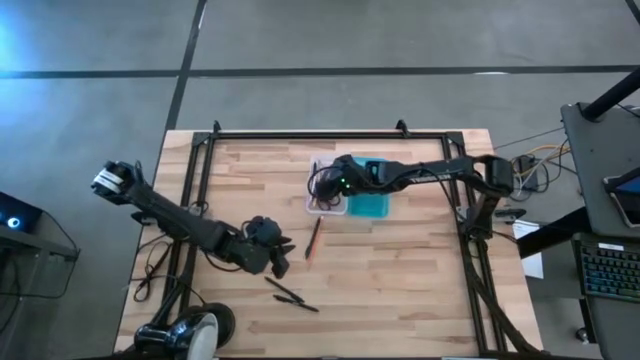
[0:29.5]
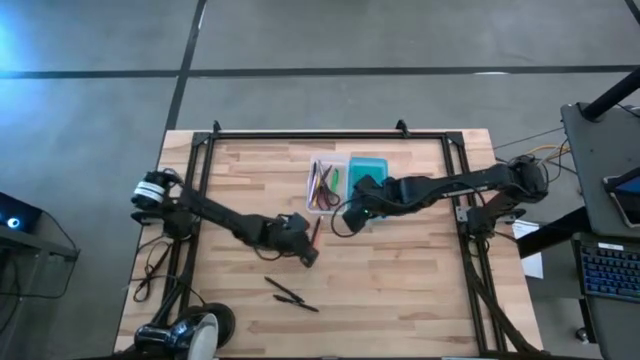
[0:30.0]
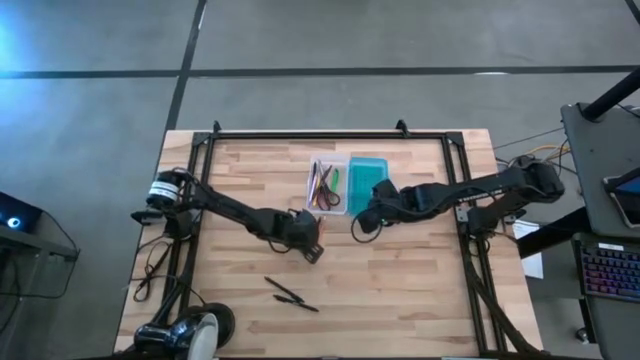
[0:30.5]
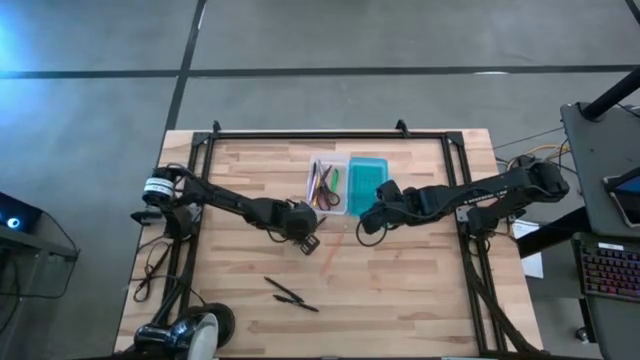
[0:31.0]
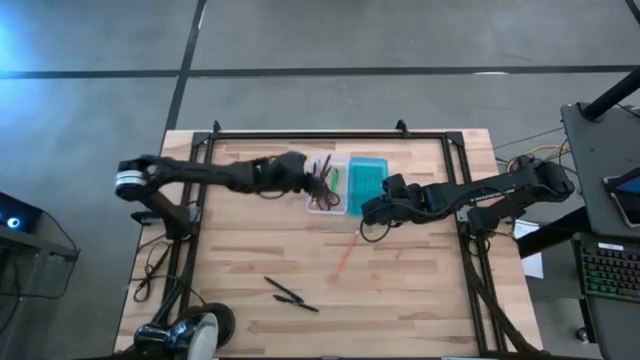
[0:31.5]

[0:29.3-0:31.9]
Task: Pick & place school supplies into a supply box
Put the black pen into the supply box

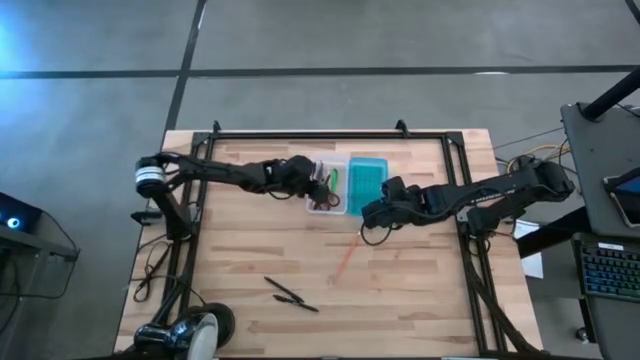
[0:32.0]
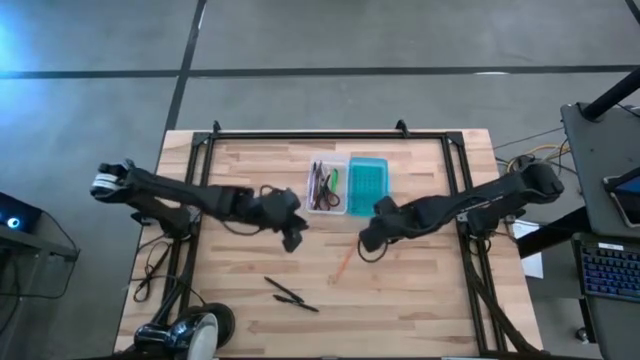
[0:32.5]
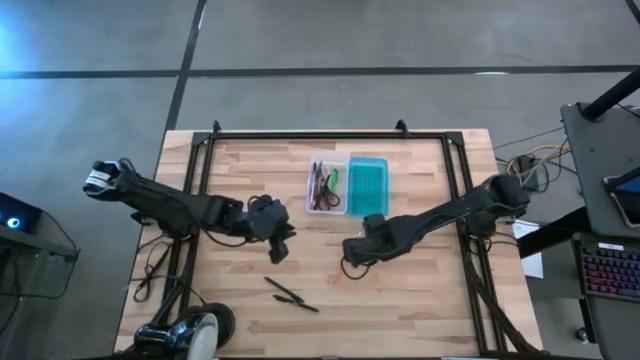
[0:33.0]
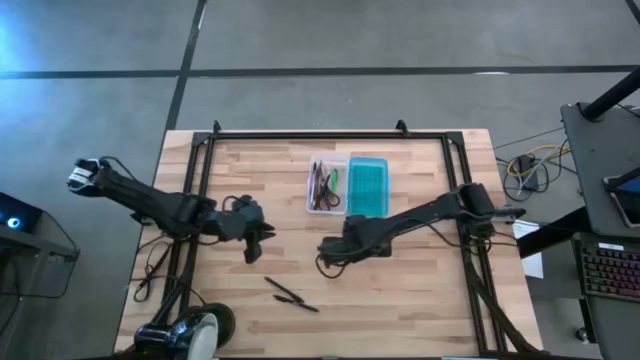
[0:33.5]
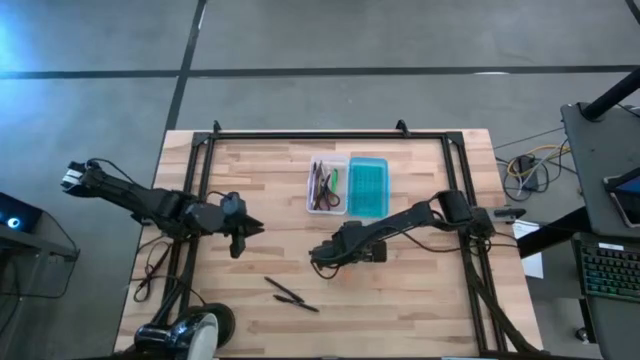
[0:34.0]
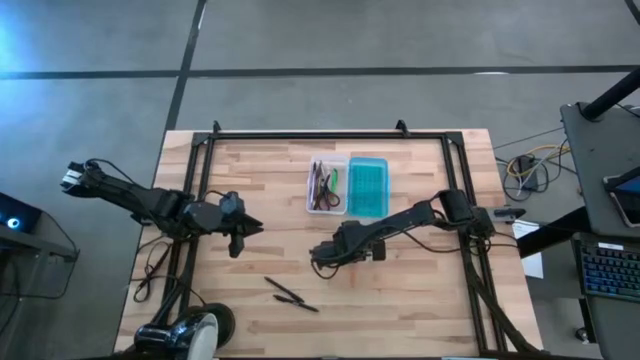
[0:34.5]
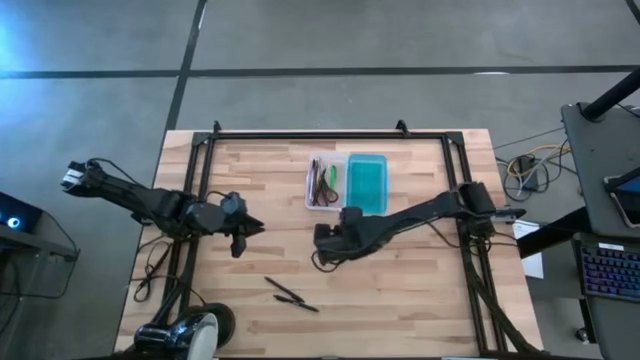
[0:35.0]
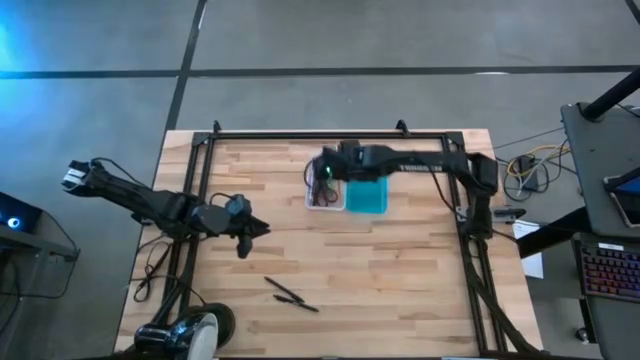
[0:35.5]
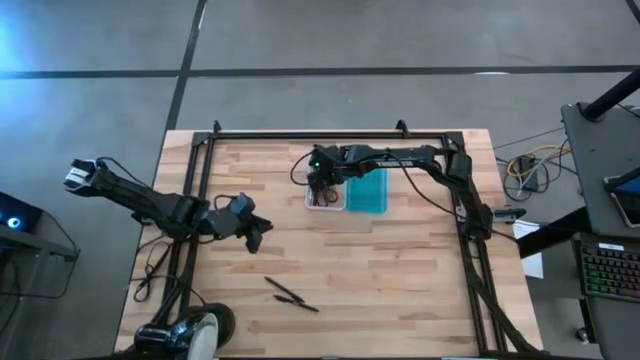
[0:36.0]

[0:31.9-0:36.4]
Put the pencil into the supply box

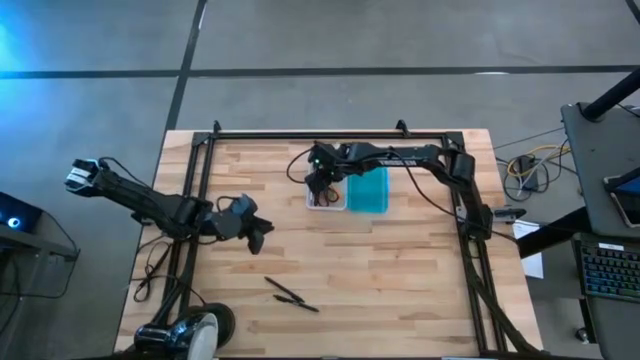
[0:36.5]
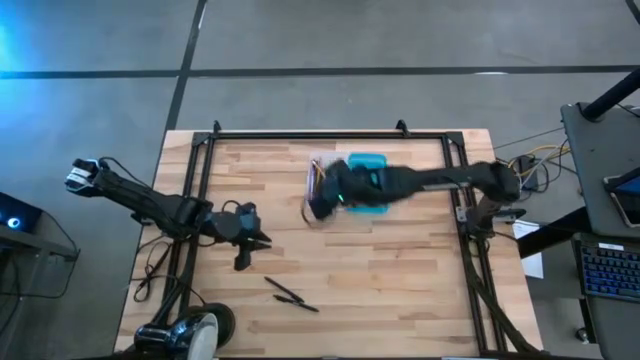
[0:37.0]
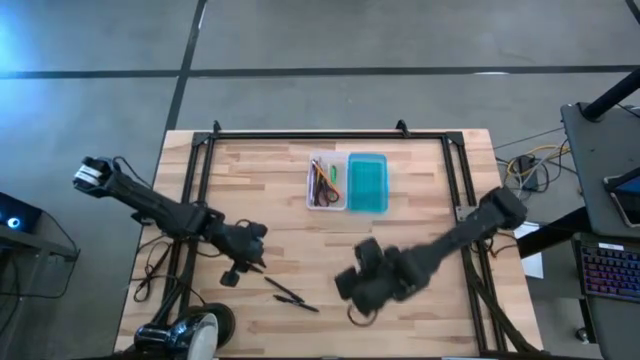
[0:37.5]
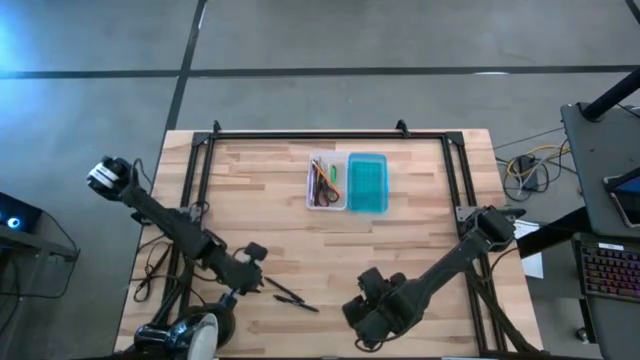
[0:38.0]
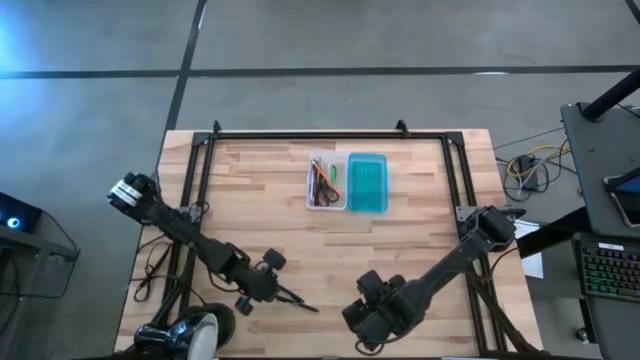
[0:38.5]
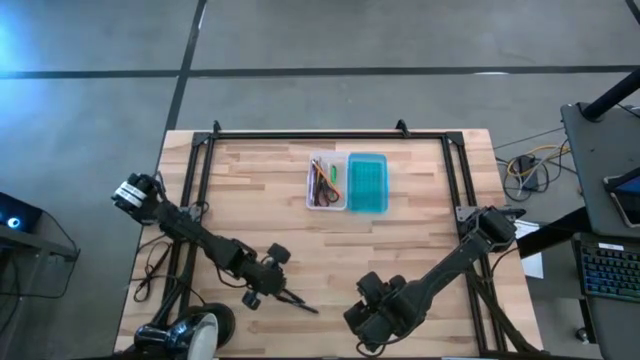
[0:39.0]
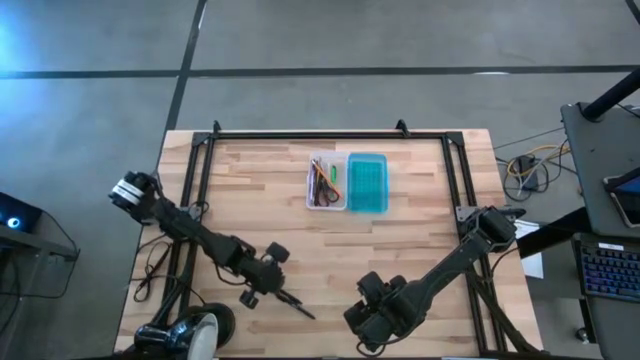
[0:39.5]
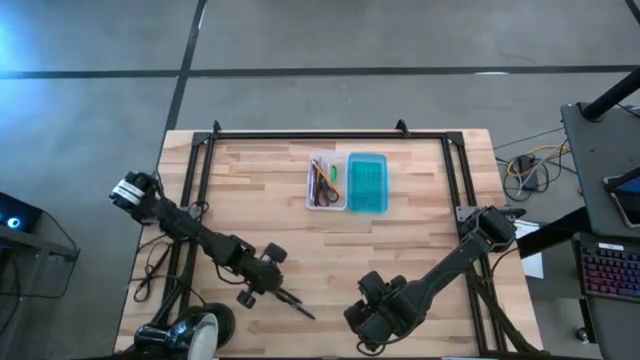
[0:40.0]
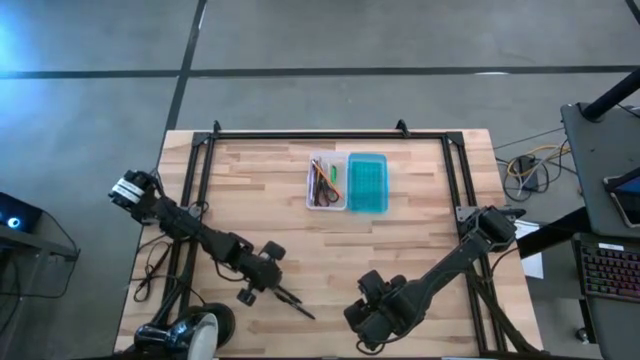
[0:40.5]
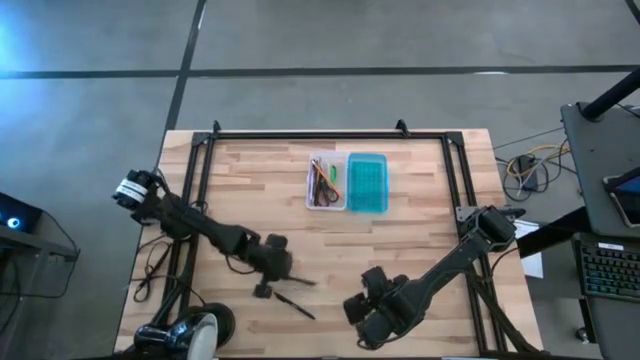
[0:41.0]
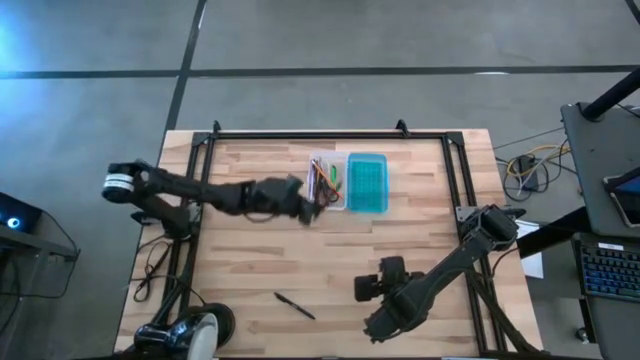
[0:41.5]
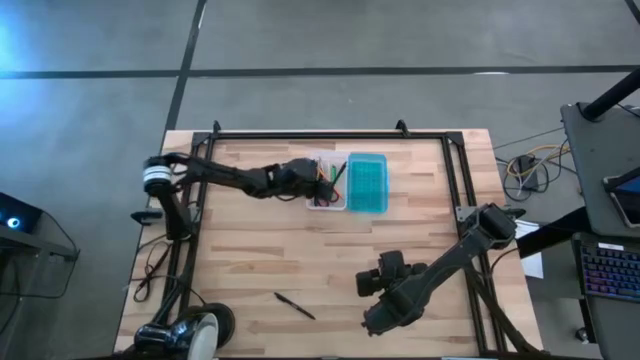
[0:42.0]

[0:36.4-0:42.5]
Put the black pen into the supply box

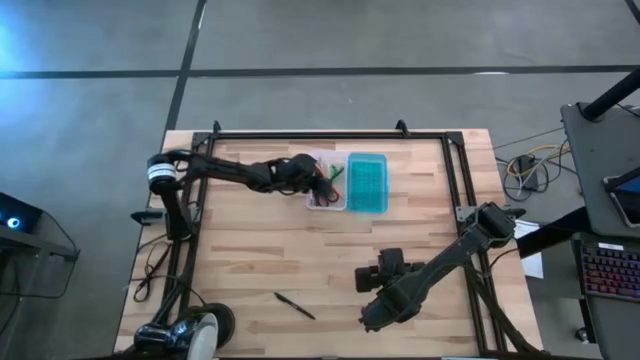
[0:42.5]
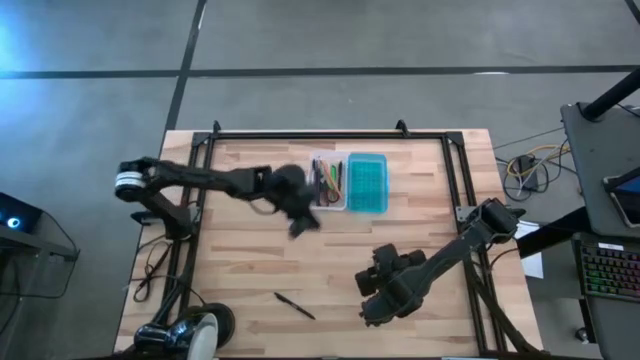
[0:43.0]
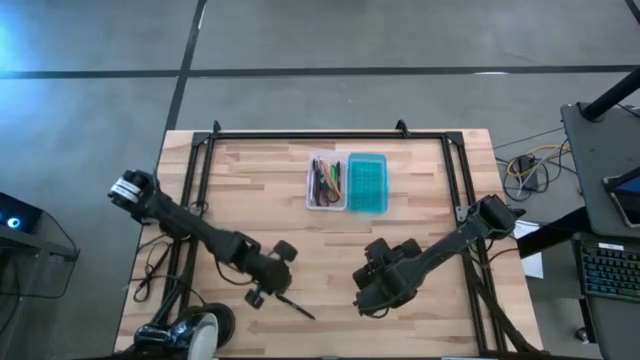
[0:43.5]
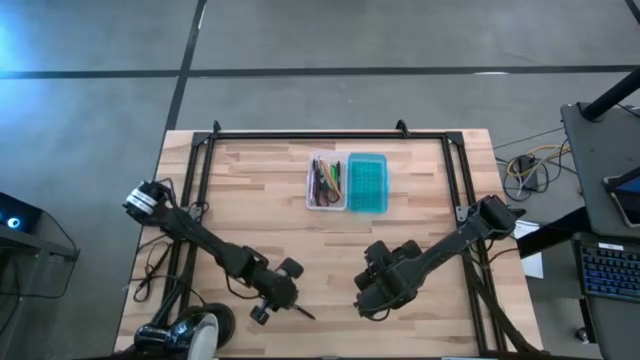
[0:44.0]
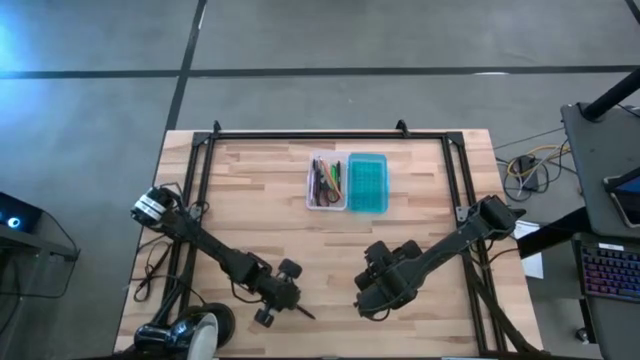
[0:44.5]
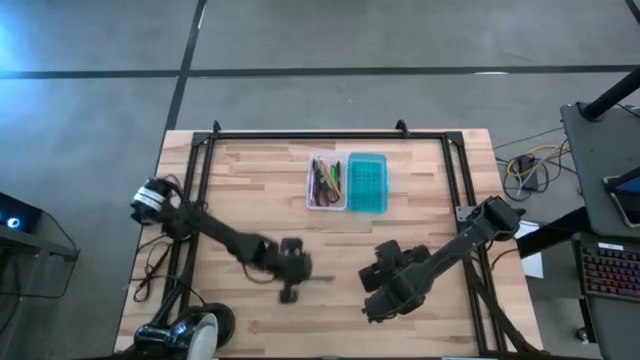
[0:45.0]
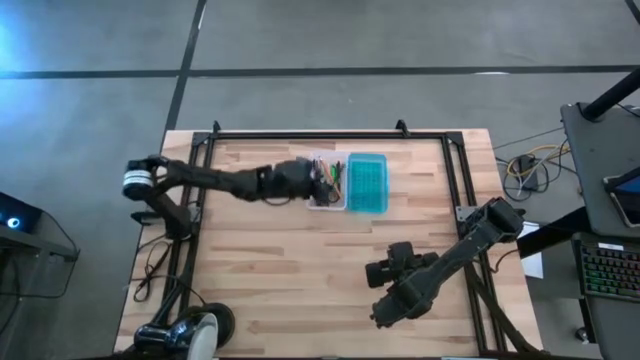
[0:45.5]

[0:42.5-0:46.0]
Put the black pen into the supply box

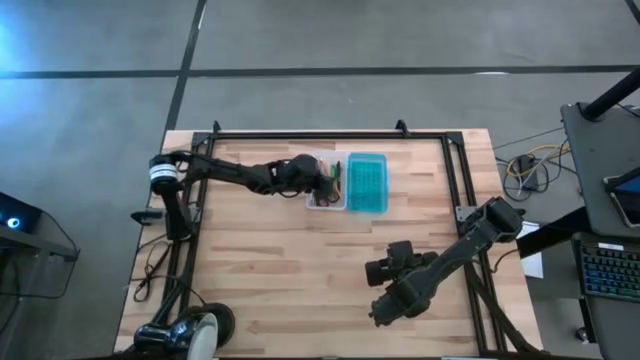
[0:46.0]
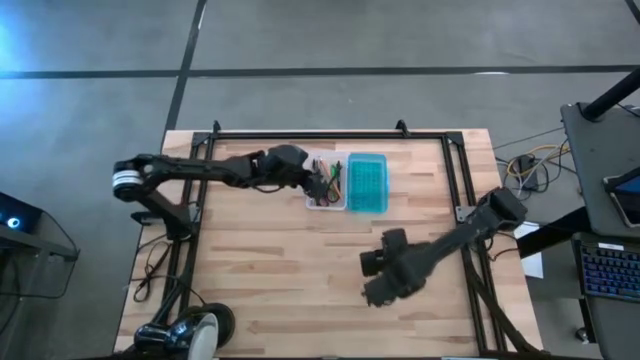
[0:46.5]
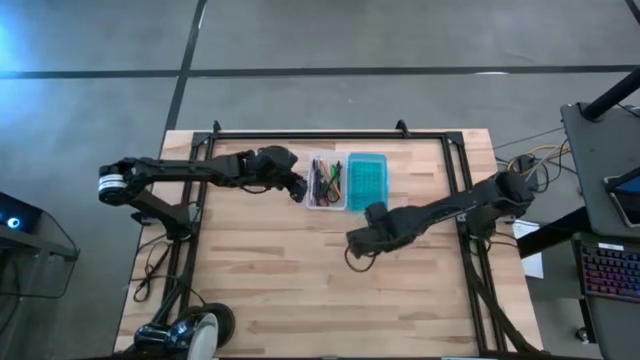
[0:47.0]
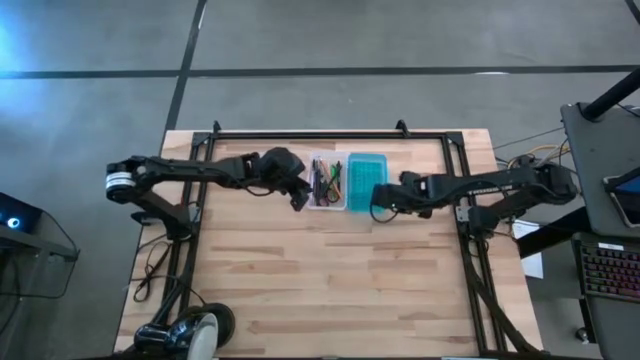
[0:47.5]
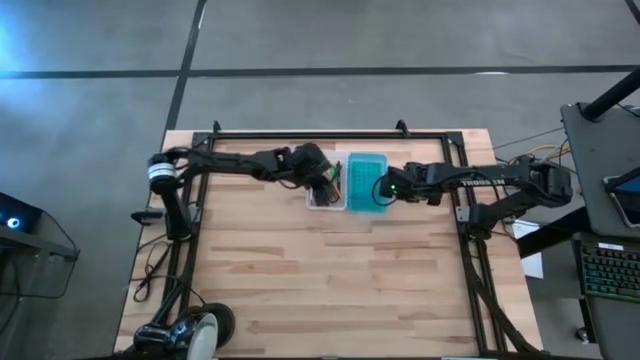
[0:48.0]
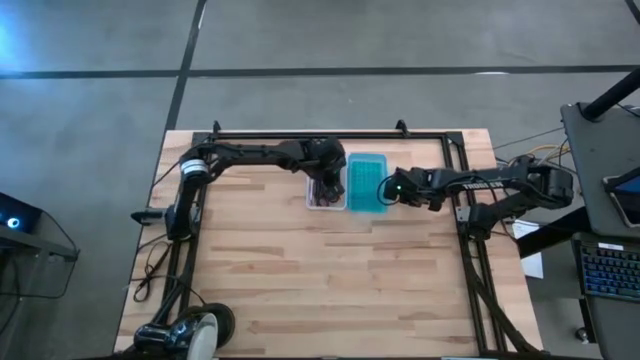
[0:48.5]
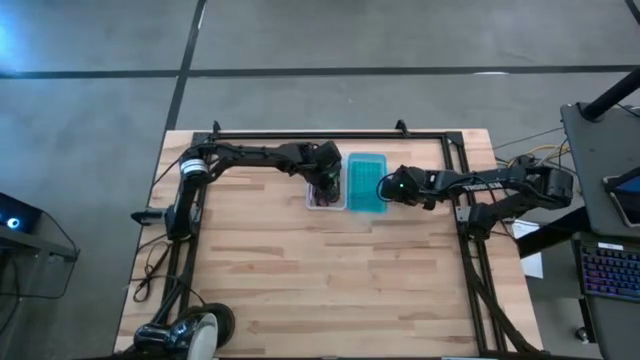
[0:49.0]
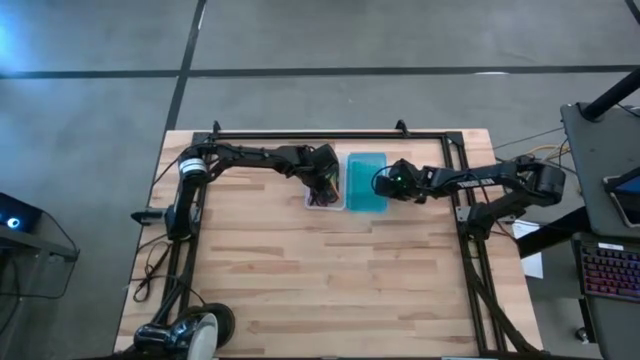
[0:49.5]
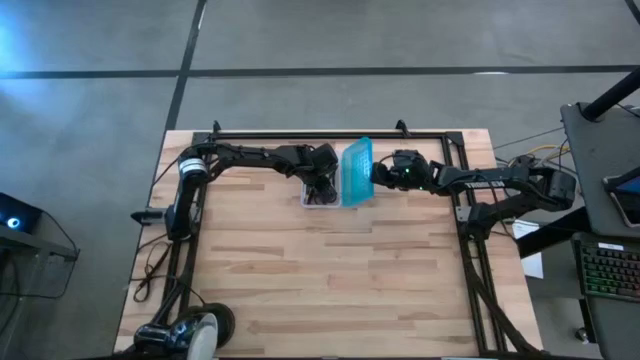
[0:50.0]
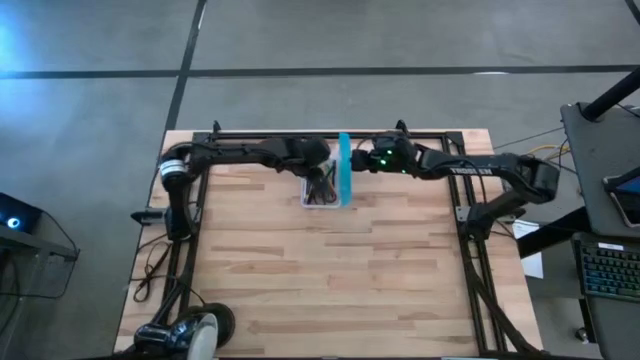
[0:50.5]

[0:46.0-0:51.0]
Close the supply box

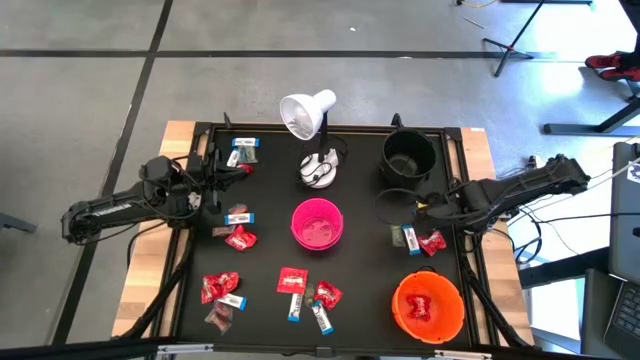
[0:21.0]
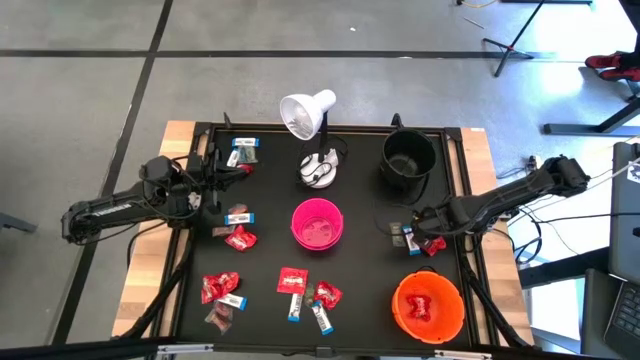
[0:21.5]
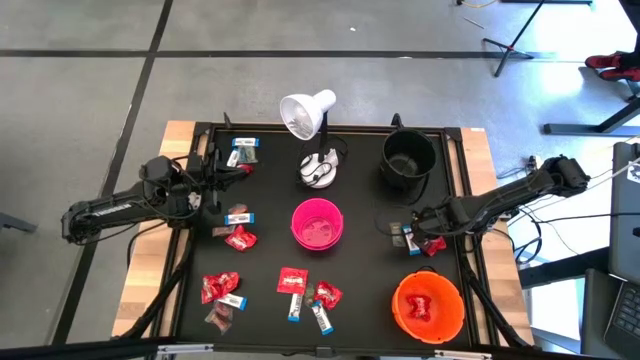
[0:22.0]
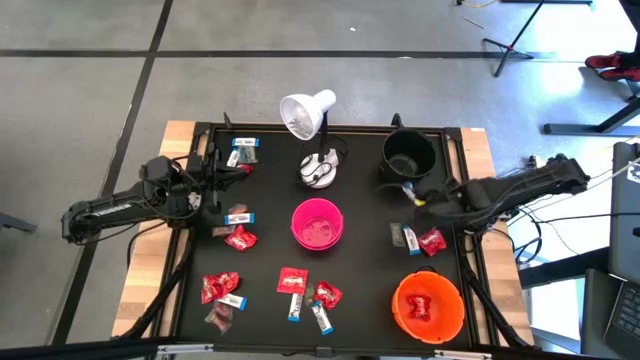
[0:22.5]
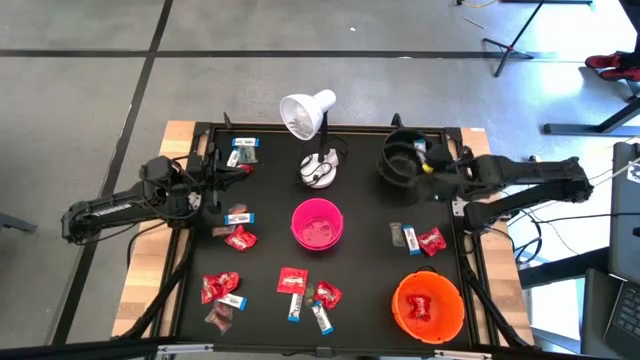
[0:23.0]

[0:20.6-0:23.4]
Task: Sort candy
Put the white chocolate bar into the black bucket
